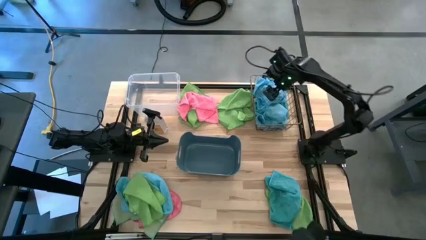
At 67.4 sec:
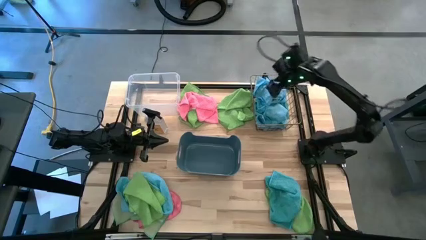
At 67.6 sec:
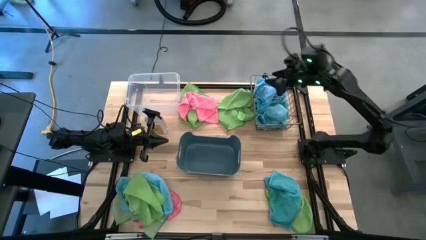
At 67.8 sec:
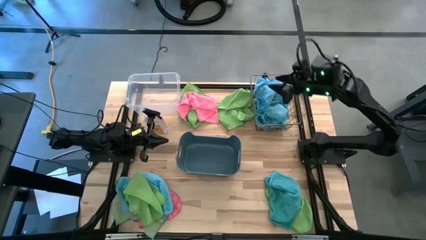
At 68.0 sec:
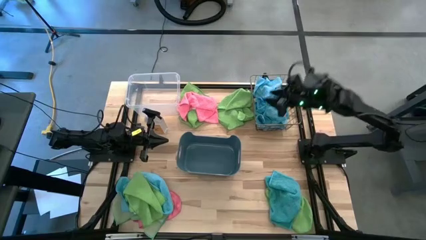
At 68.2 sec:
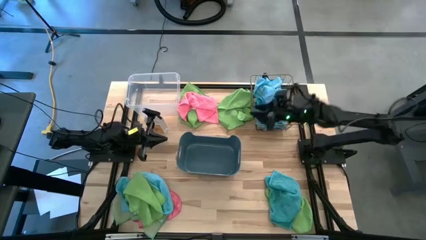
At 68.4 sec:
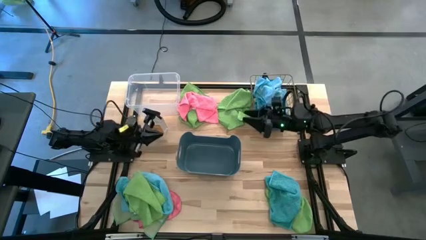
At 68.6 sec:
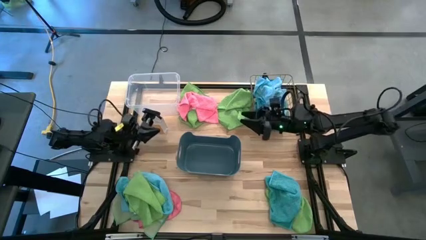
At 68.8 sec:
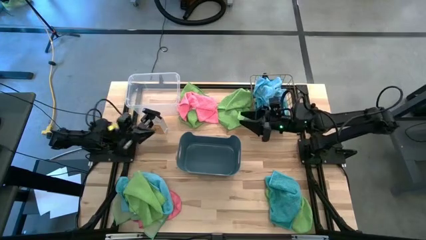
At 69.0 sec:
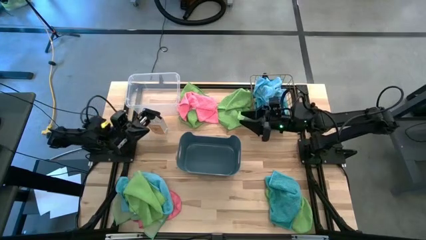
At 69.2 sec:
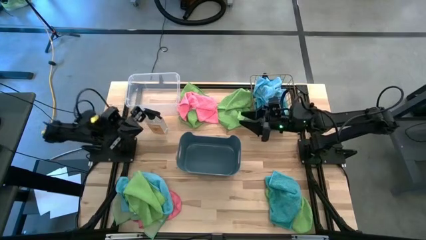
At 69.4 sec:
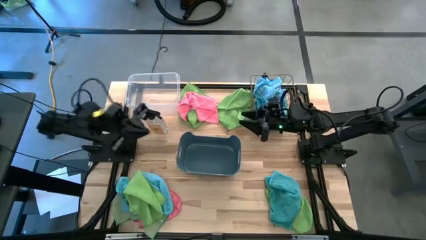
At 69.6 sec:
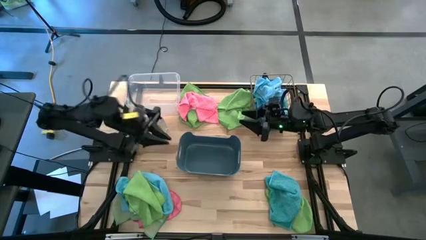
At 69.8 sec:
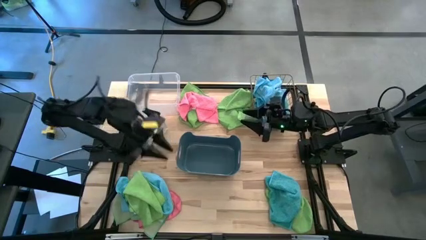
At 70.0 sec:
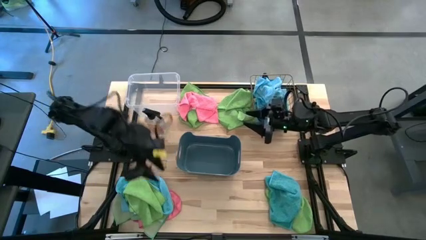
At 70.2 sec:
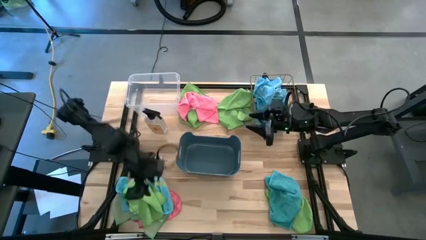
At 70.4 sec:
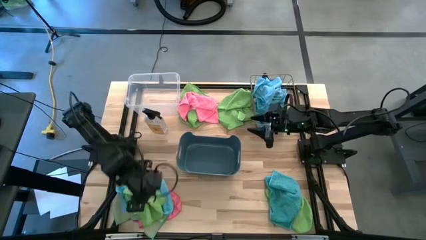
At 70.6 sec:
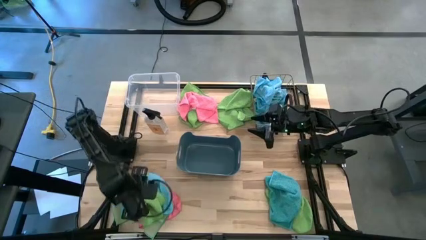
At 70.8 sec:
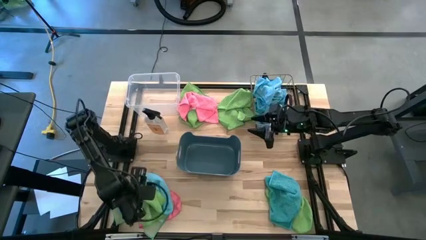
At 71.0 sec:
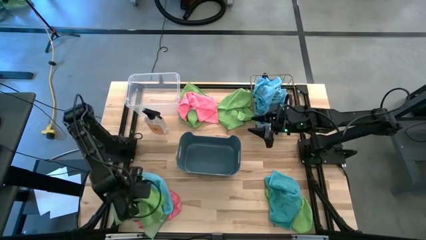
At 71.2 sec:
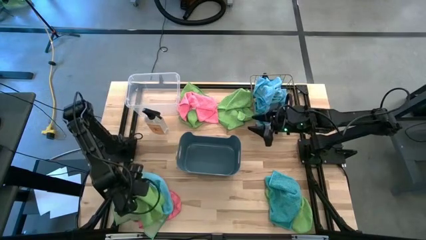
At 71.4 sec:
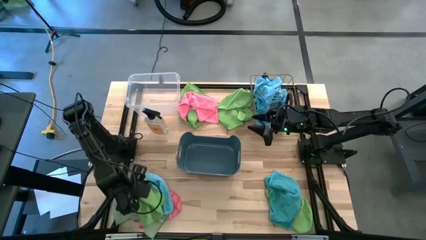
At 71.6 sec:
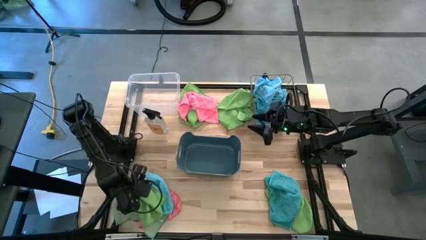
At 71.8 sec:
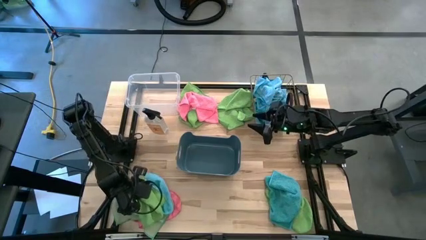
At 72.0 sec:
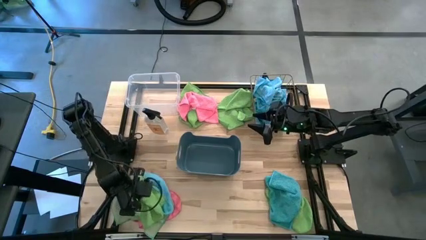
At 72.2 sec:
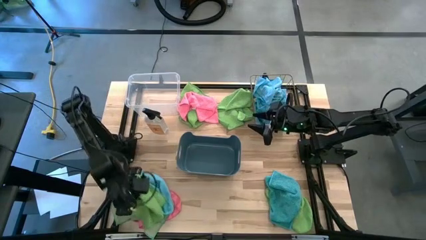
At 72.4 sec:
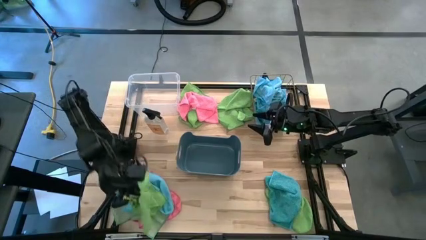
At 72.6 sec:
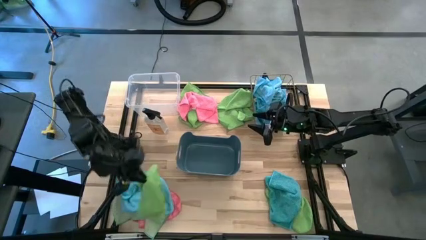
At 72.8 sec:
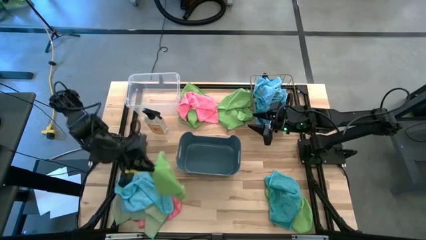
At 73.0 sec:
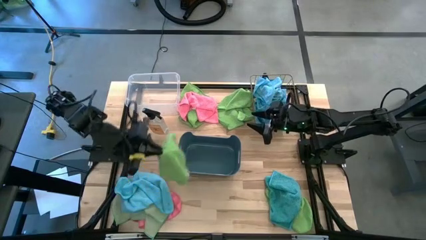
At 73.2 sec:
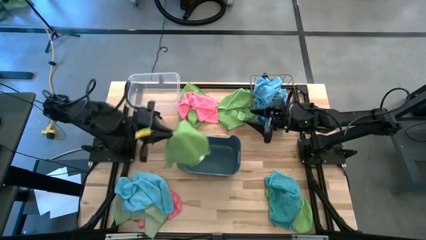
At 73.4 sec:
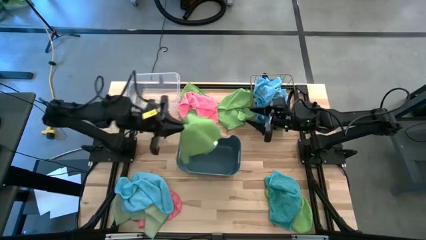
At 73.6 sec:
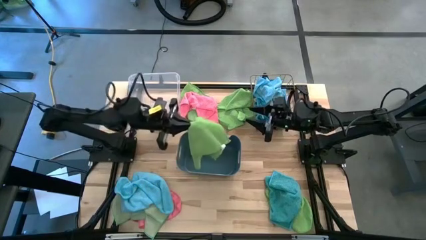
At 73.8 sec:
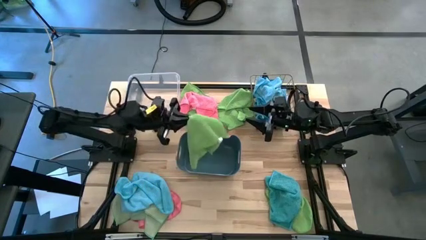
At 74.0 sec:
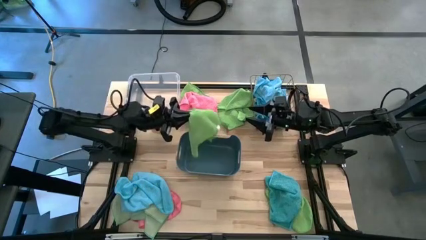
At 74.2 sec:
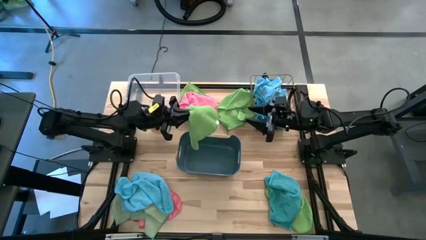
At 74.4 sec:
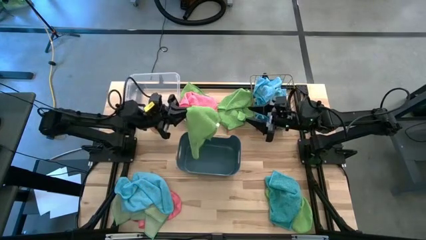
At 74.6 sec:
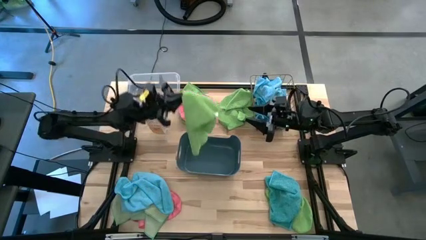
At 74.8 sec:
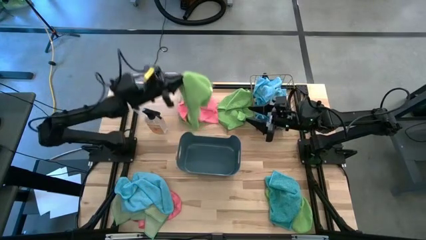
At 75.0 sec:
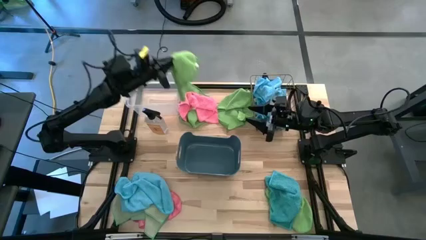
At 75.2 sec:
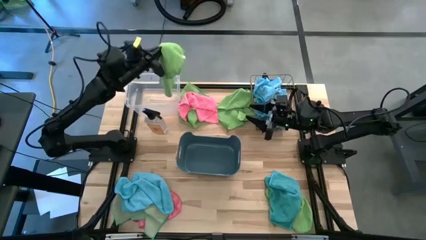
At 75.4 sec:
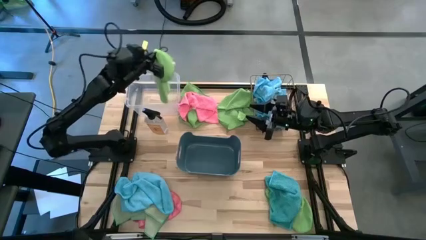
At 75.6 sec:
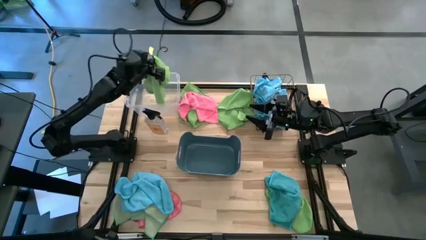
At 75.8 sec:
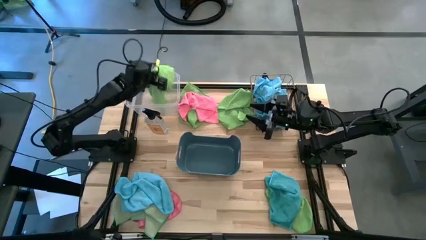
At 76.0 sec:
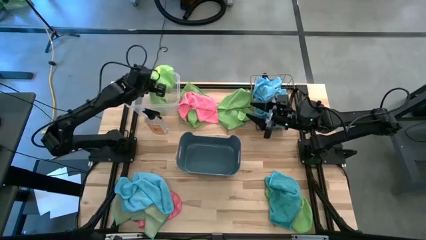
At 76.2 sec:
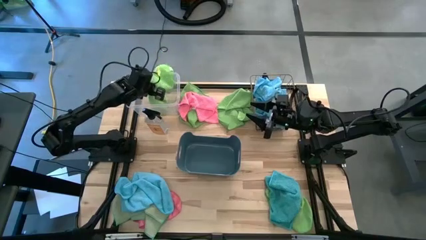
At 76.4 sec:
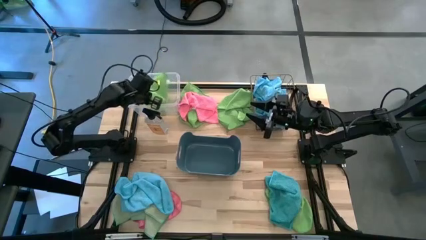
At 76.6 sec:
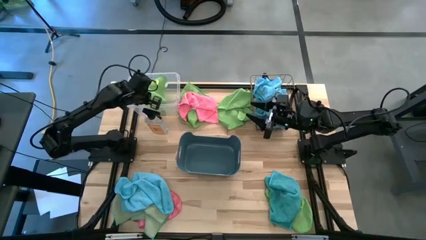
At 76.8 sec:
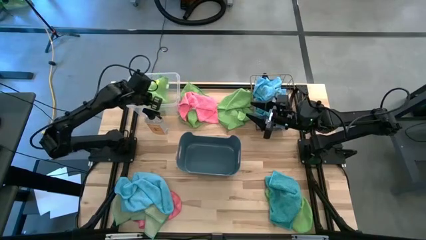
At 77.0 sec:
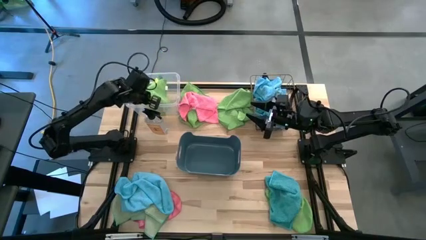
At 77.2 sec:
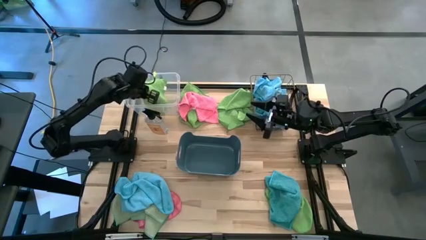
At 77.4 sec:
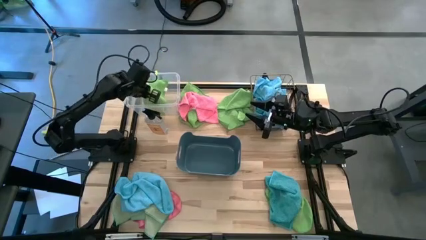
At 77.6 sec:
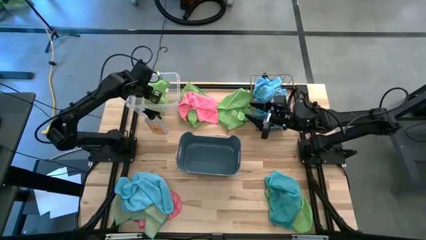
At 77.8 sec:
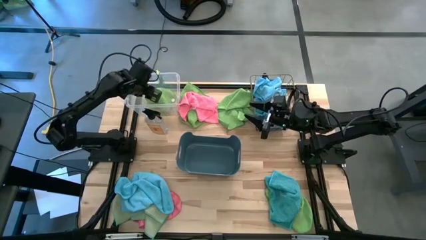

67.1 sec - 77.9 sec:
Task: Sort microfiber towel by color & place in baskets
Put the green microfiber cloth into the transparent bin
